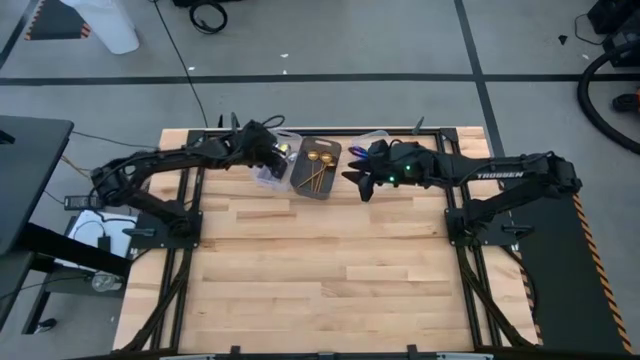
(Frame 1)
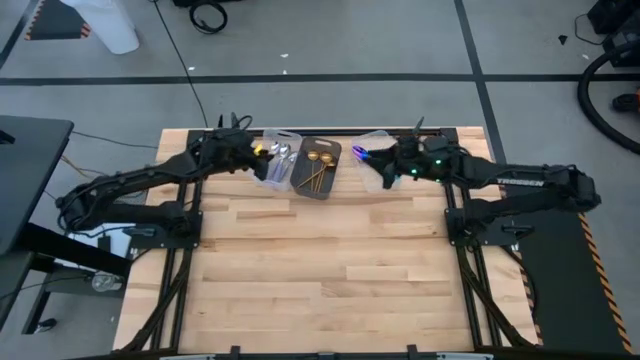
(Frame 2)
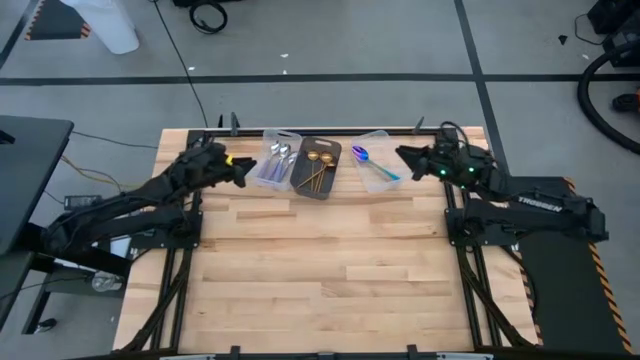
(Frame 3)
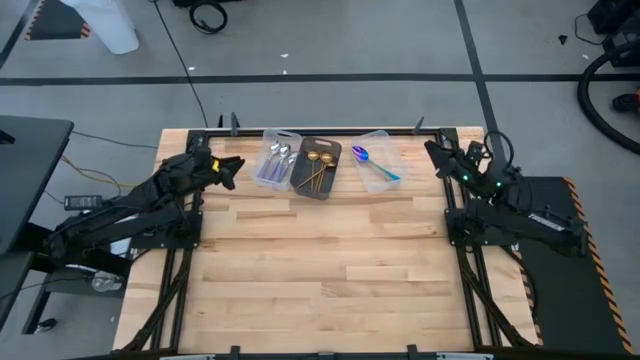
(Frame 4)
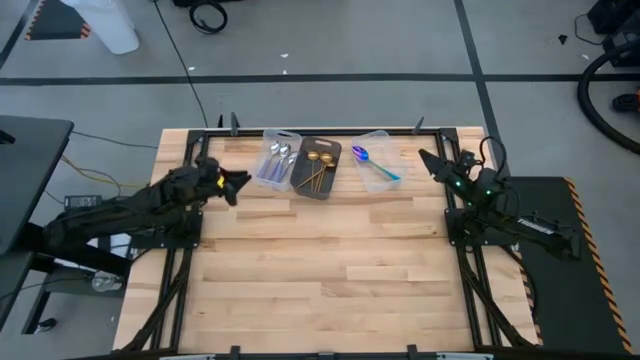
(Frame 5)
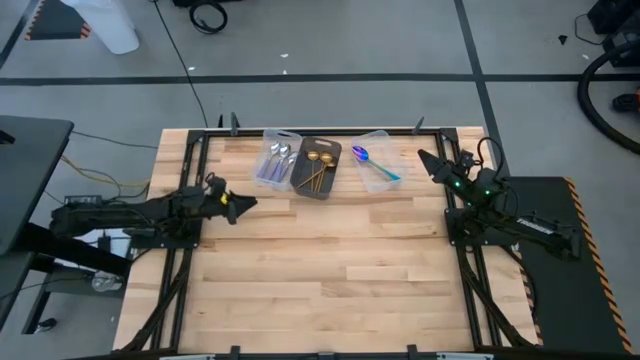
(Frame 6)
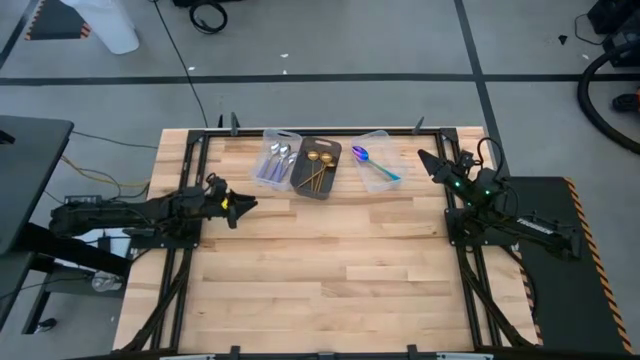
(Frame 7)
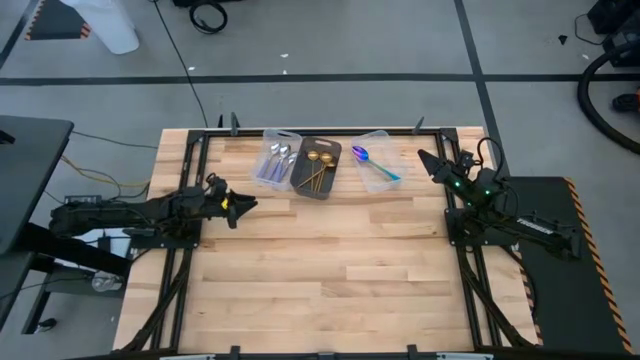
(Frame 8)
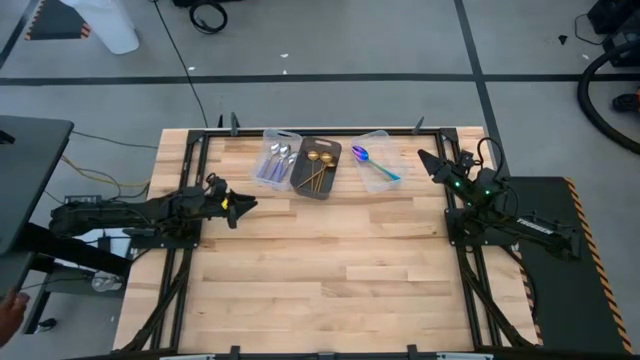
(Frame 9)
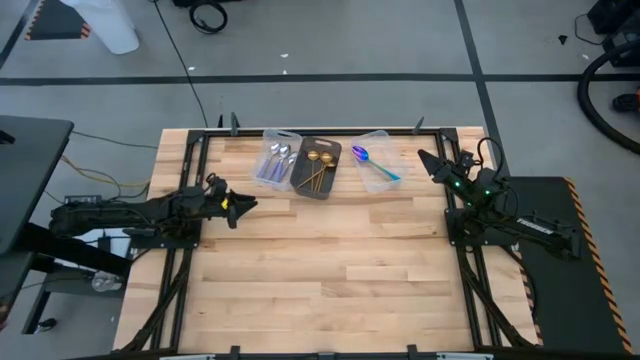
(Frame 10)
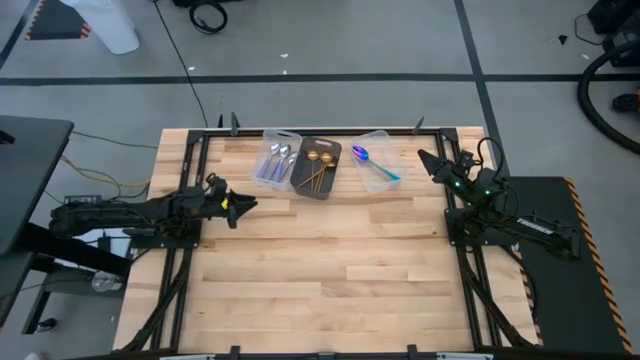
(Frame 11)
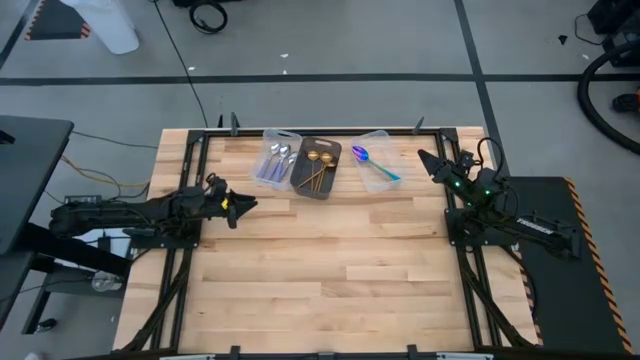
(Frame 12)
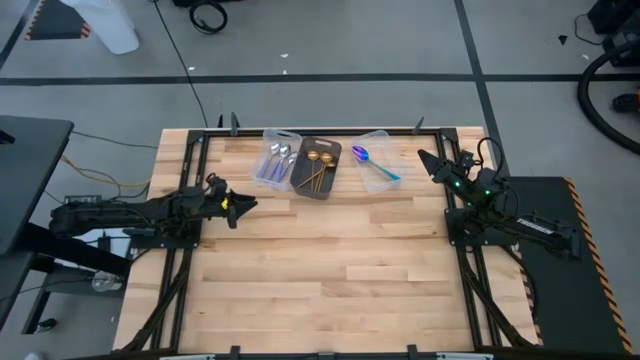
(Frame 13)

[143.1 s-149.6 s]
Task: Sort silverware by color (type)
Return to Home Position

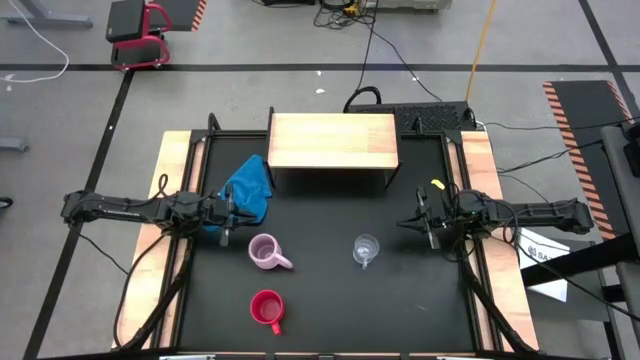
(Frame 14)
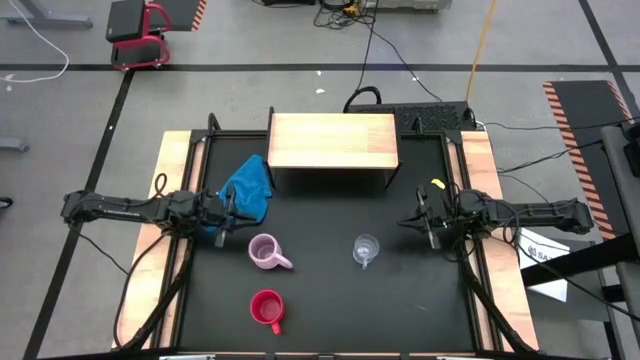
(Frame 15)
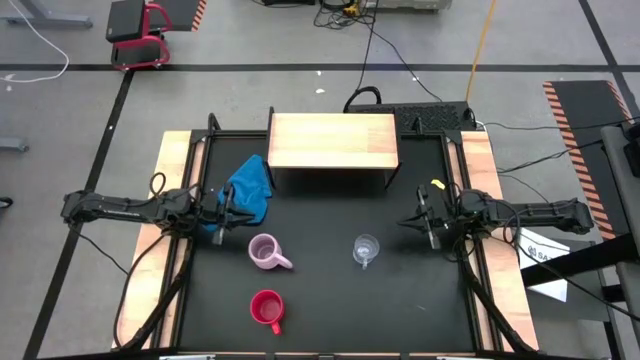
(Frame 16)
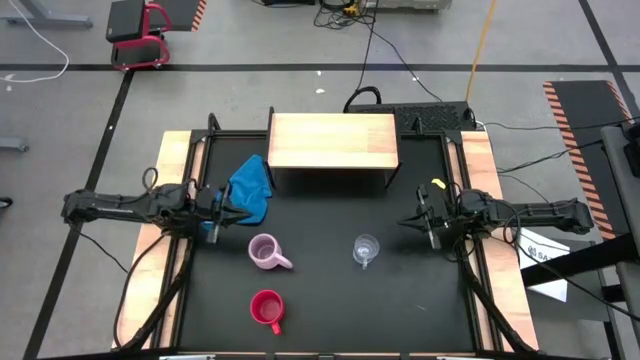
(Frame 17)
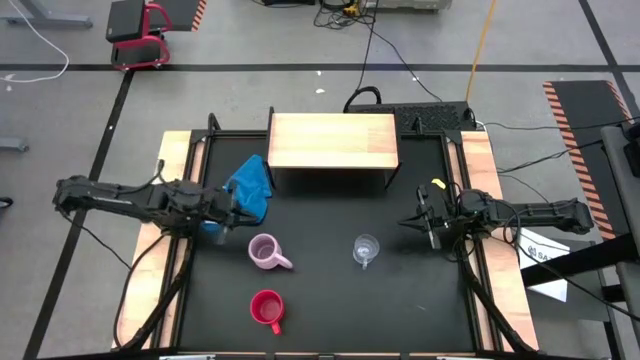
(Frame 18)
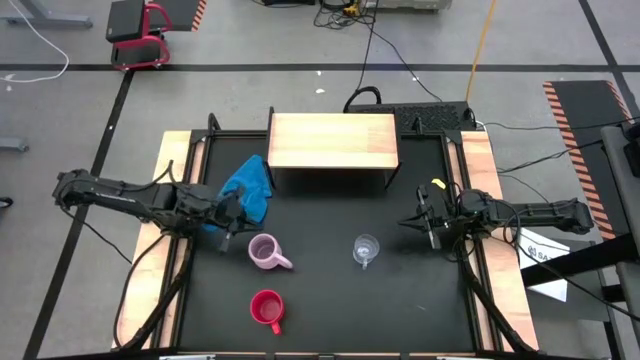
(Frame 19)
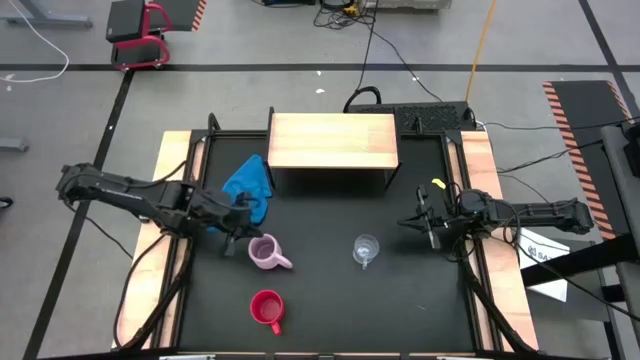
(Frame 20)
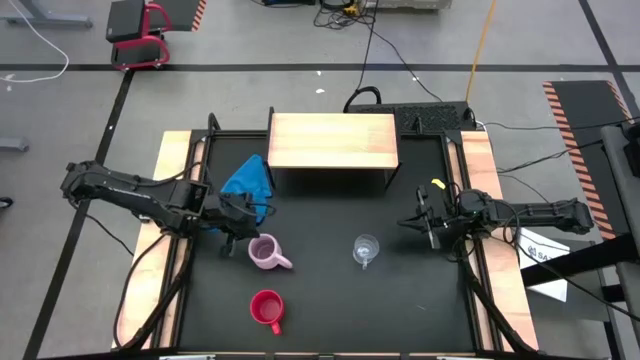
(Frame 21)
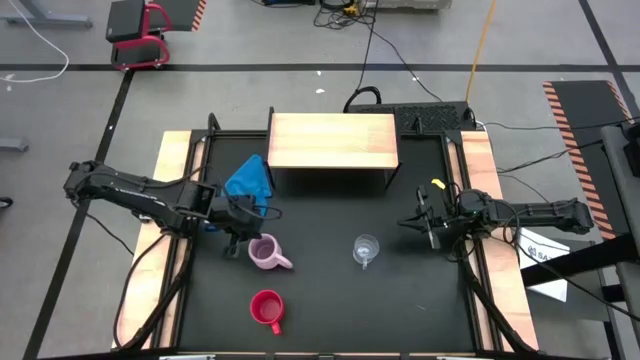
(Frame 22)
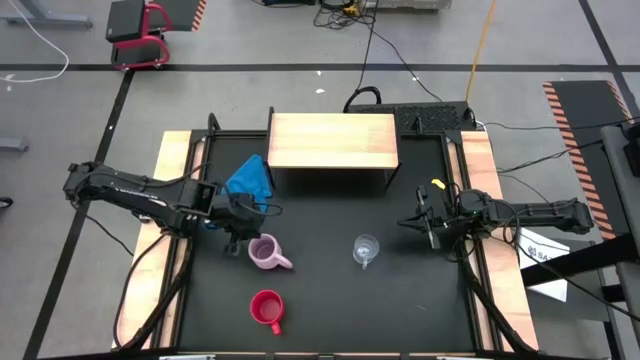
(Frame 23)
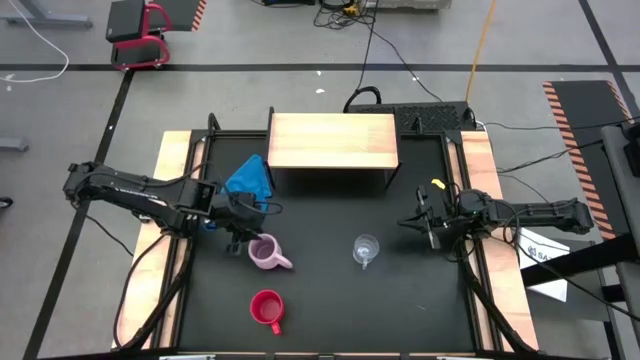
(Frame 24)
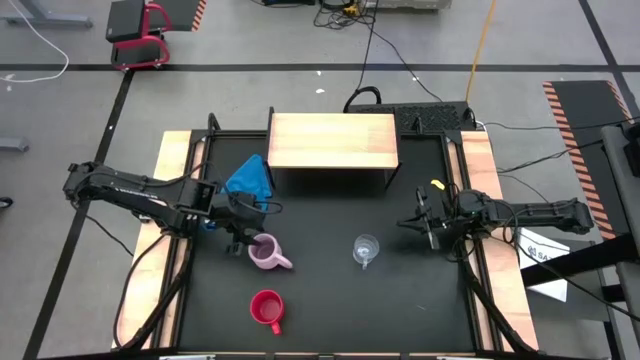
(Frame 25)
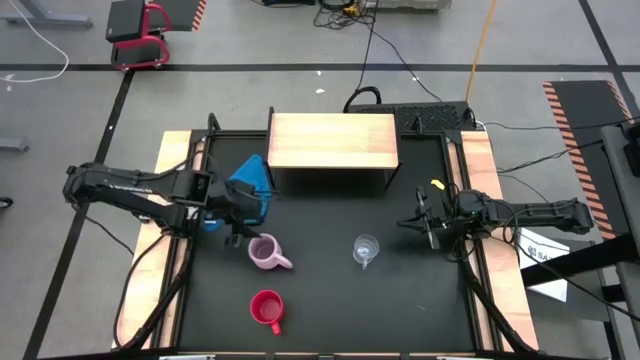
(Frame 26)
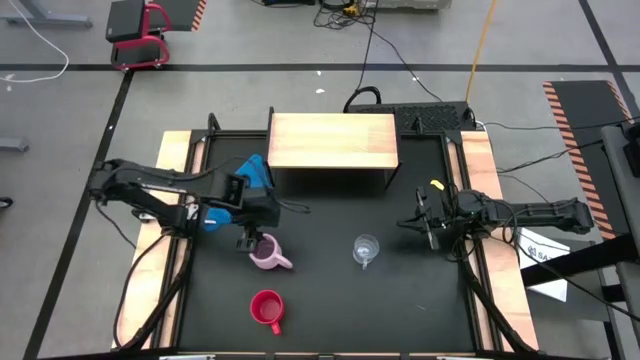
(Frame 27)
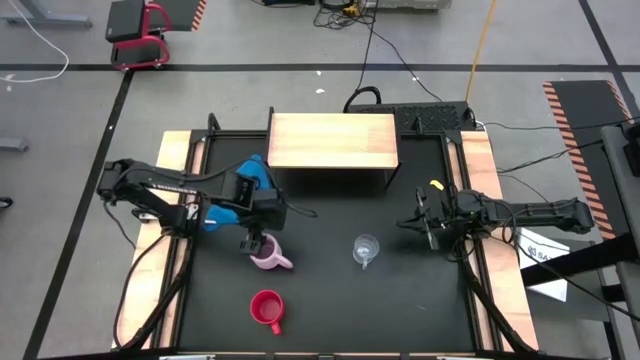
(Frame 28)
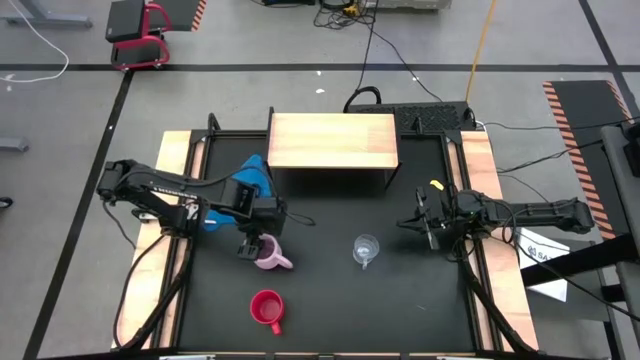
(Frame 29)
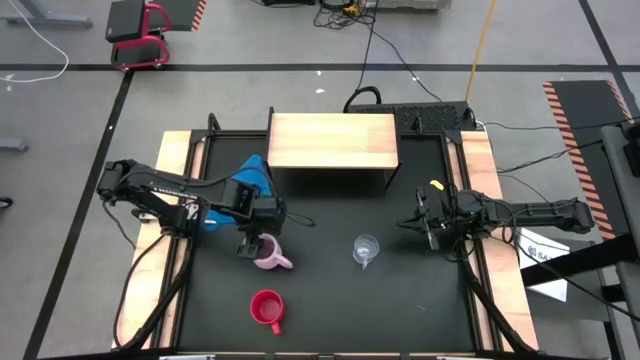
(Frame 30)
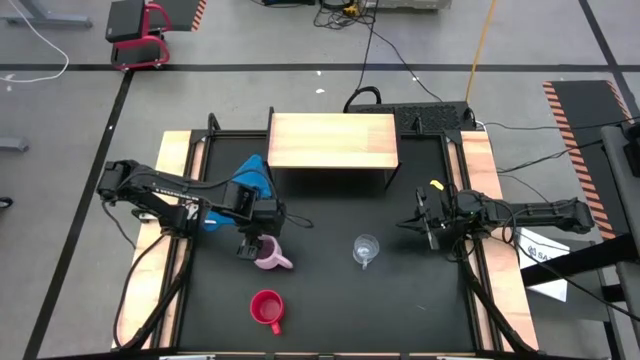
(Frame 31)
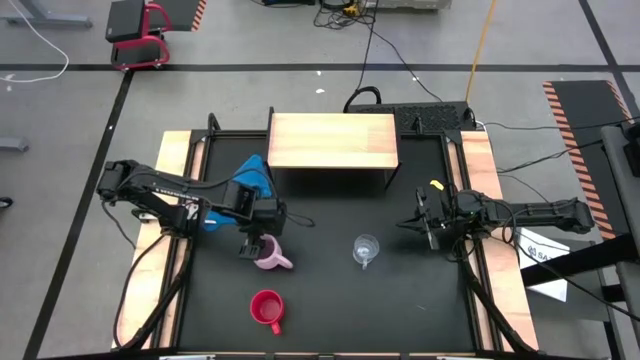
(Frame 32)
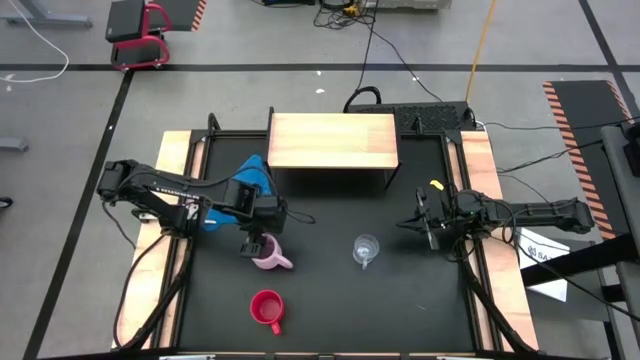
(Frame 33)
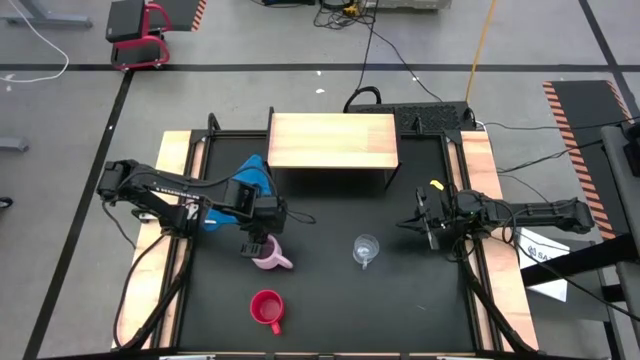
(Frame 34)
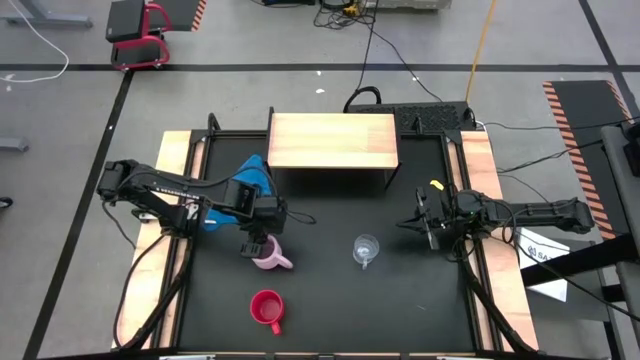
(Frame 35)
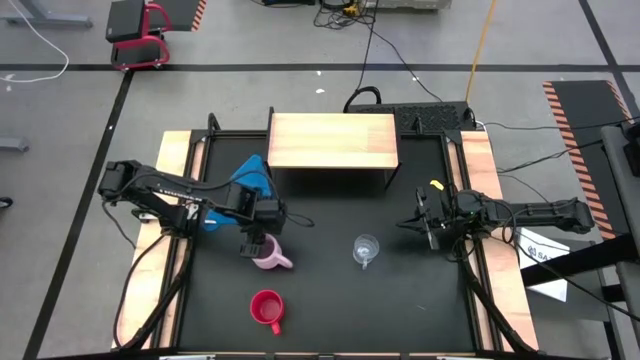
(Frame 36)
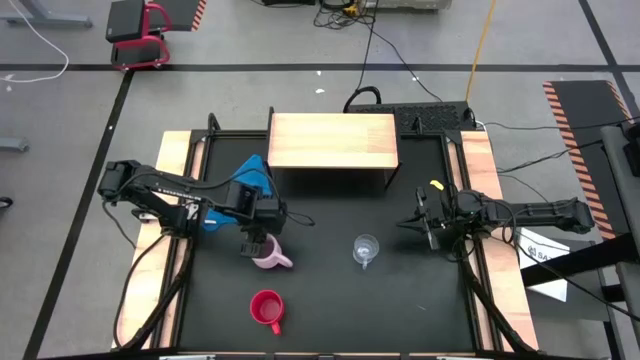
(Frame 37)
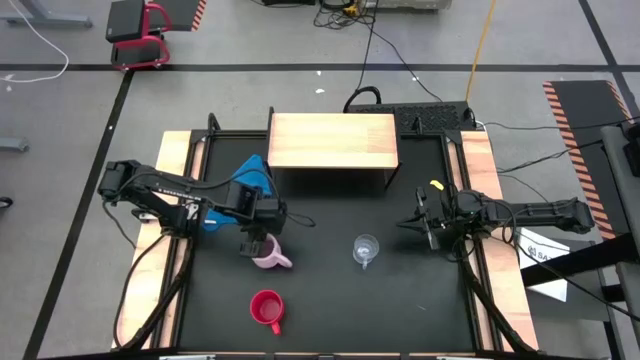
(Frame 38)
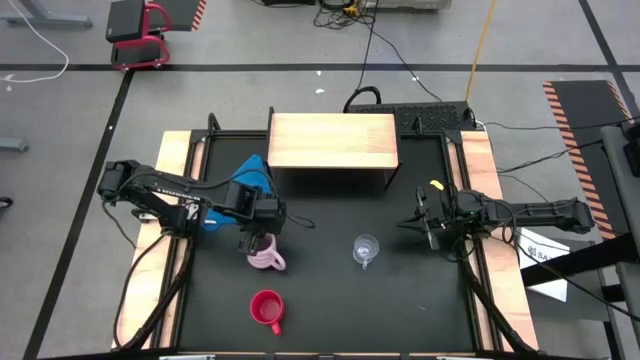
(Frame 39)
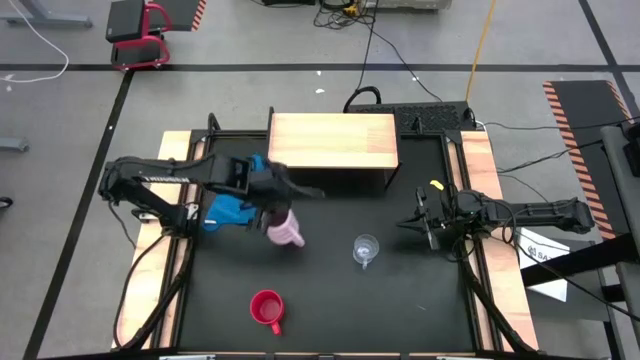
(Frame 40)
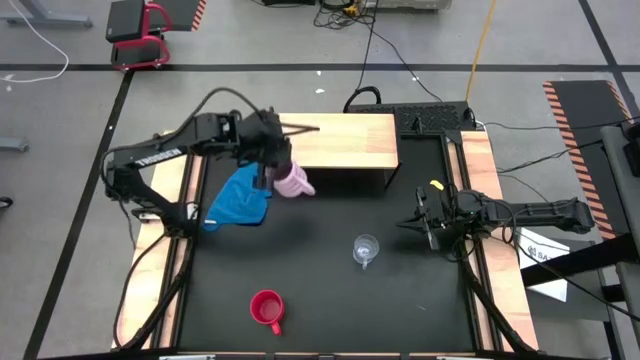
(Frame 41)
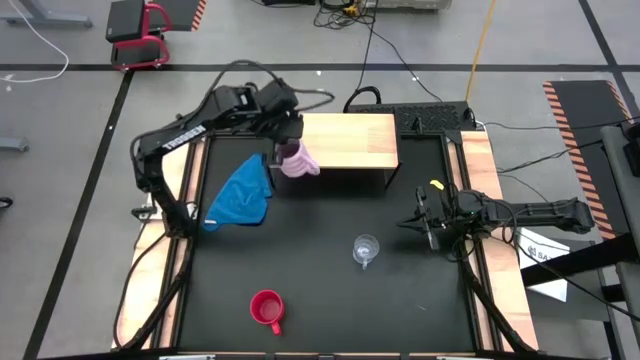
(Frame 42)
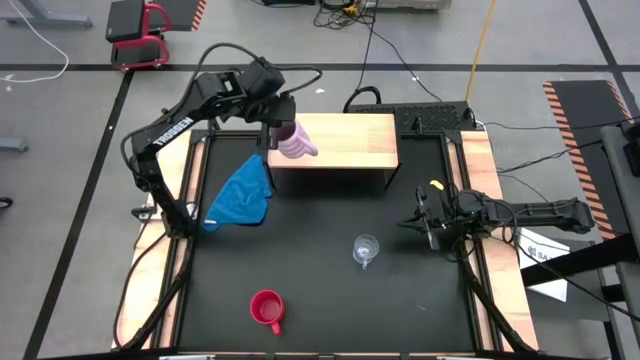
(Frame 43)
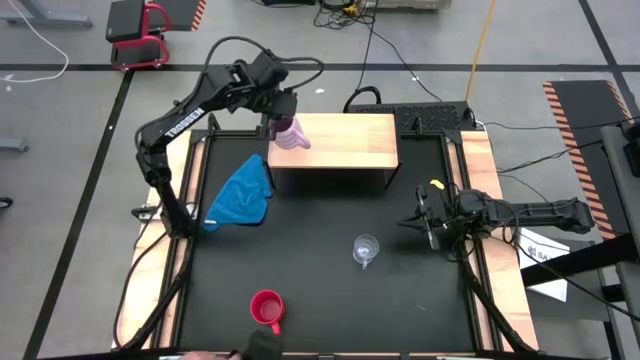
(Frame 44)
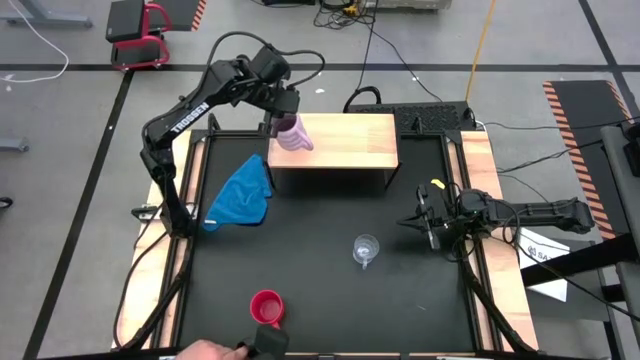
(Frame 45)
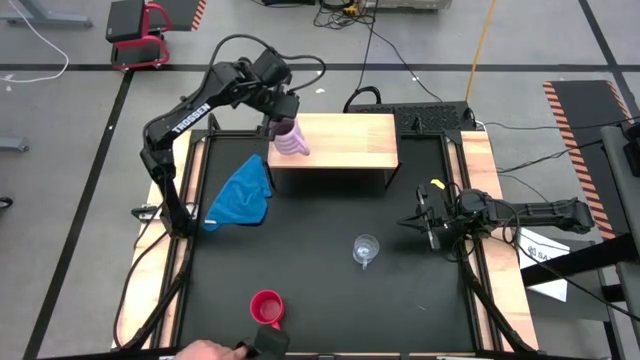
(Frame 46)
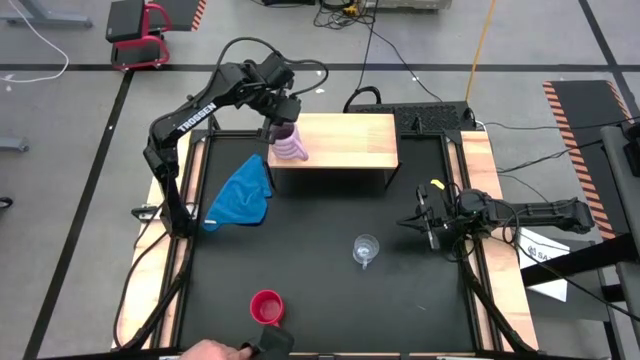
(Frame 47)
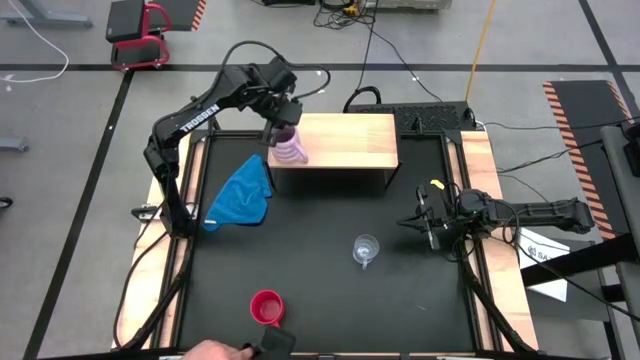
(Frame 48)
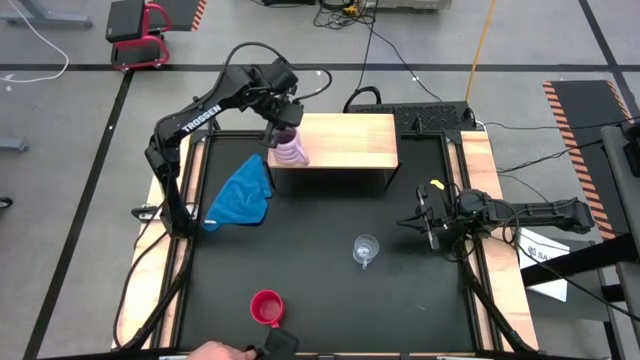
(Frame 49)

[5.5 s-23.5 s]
Task: Stack small to large cups/mugs on shelf
Put the purple mug on the shelf
